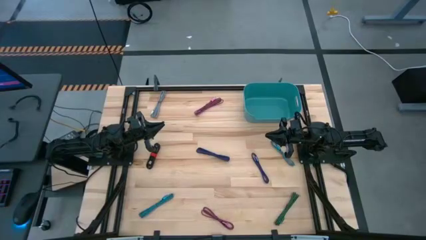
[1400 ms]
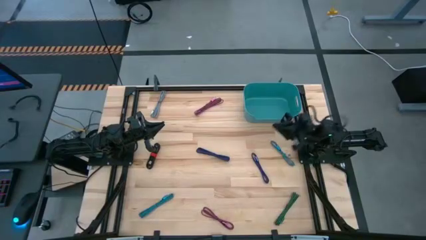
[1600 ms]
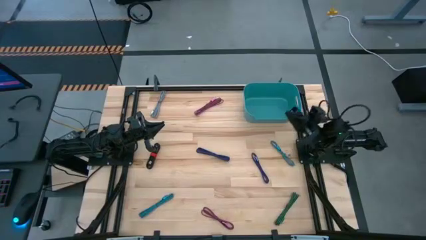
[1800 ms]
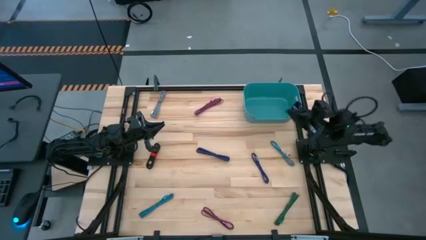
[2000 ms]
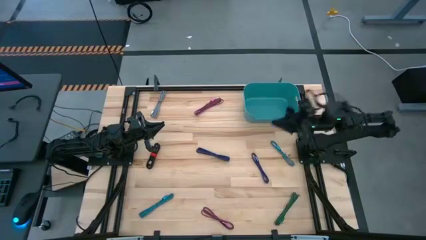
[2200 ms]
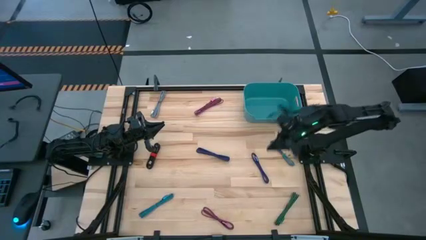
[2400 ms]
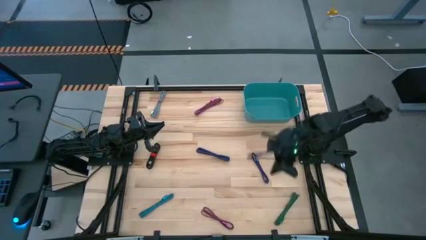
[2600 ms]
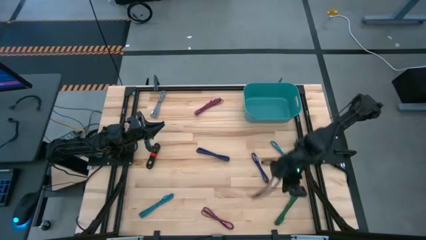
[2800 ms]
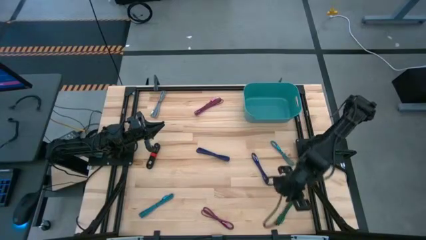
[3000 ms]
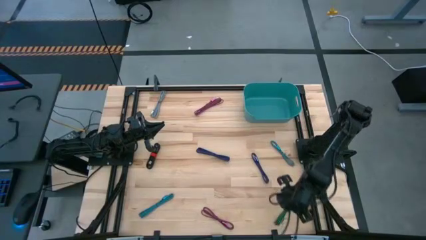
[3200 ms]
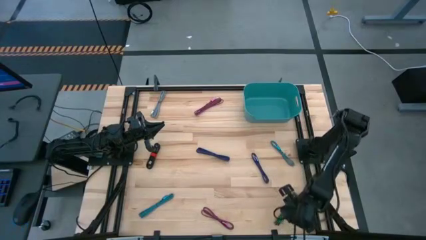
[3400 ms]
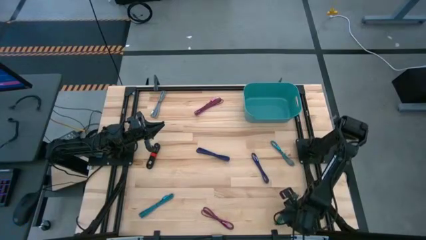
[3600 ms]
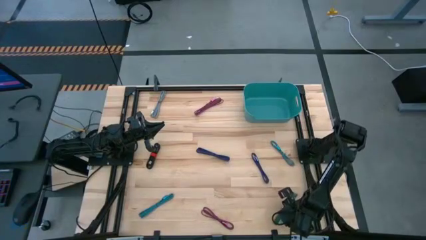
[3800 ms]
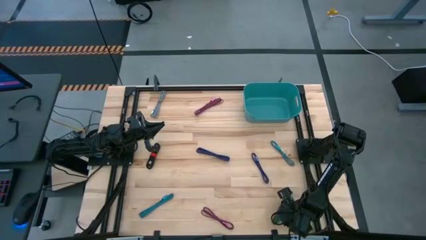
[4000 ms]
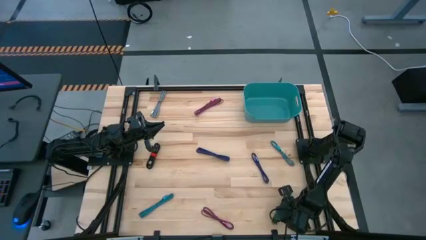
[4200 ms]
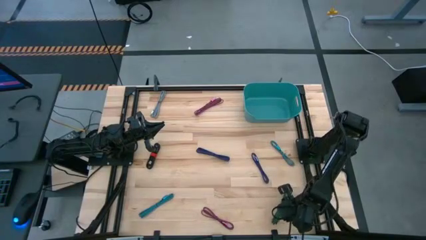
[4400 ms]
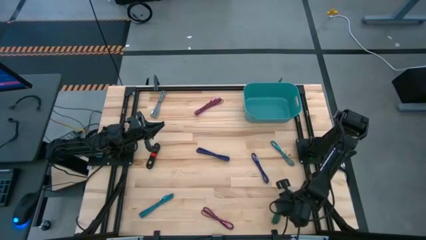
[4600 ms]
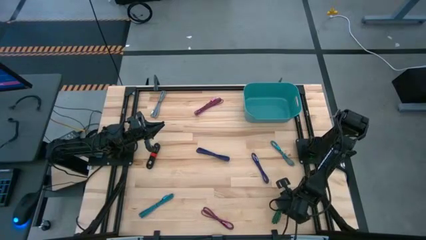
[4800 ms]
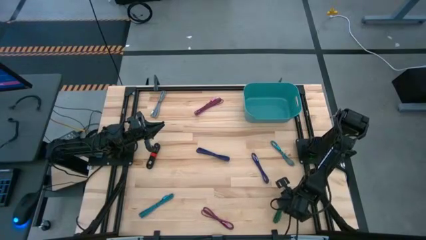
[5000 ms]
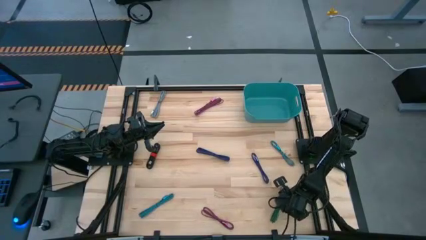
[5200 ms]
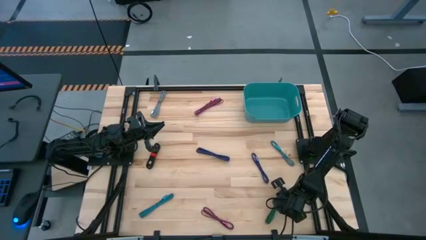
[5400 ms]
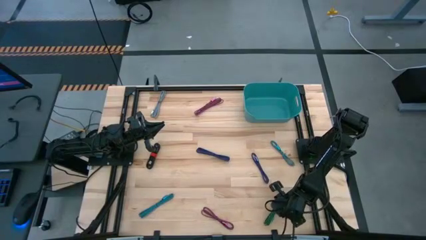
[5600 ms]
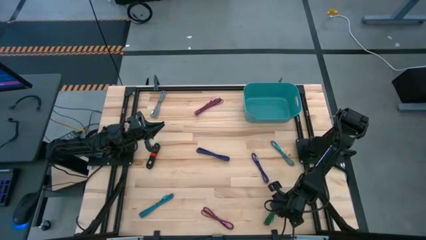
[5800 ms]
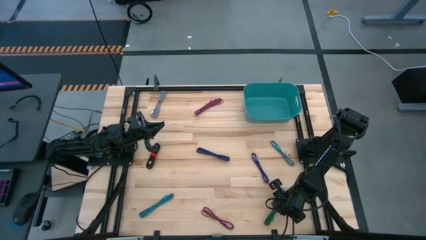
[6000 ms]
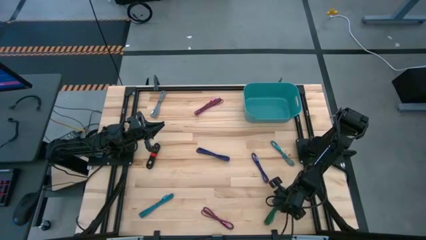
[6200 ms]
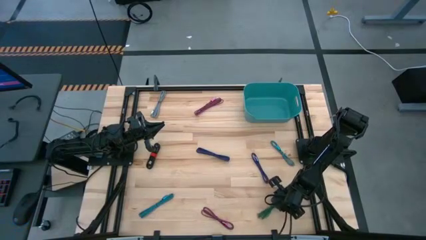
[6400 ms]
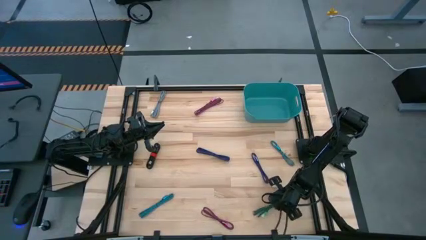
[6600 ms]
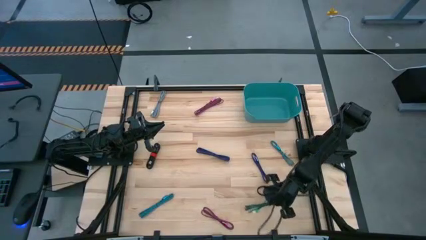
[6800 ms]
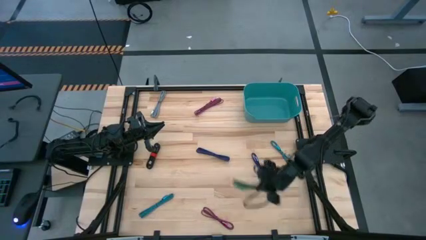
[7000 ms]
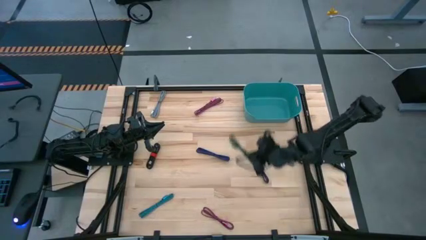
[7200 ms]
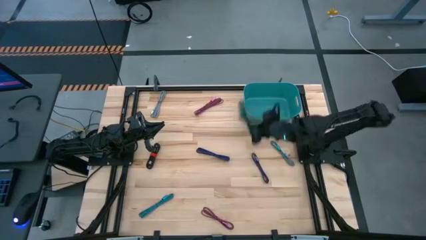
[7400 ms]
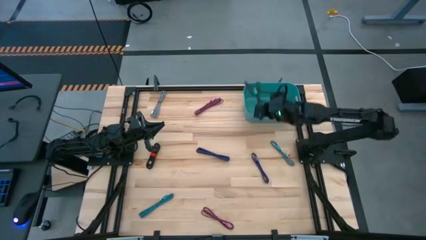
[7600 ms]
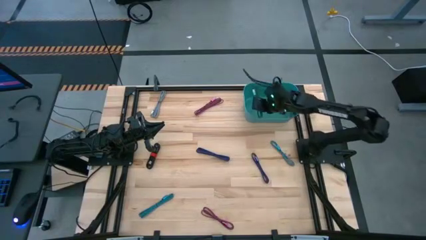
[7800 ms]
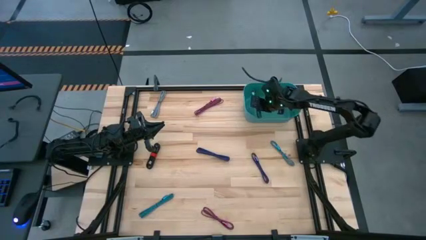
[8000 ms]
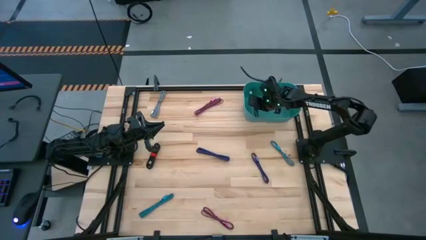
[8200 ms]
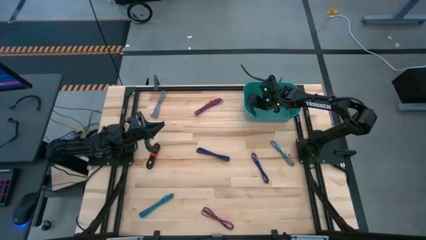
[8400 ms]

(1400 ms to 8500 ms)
Task: Pick and place USB-C Cables
Put the green charger cable into the blue bin

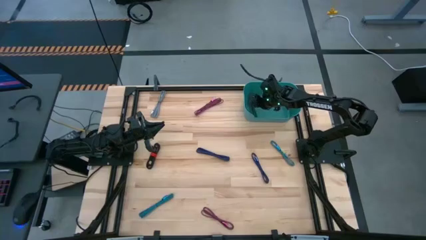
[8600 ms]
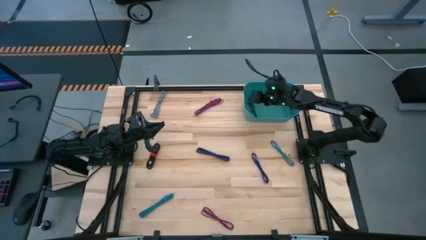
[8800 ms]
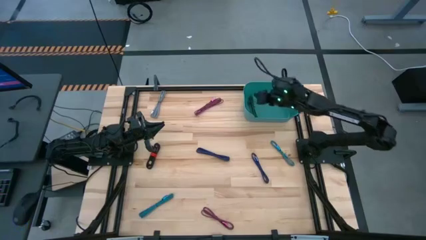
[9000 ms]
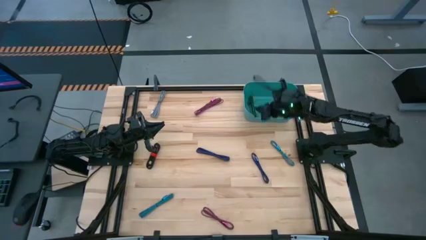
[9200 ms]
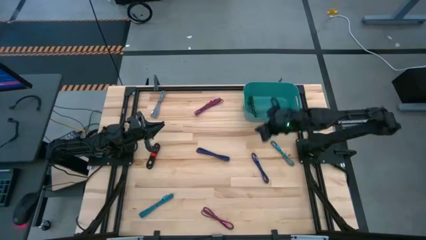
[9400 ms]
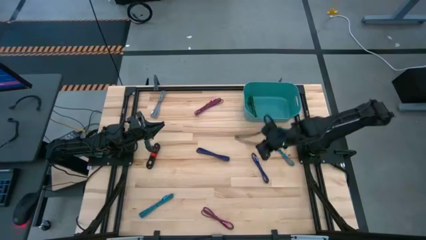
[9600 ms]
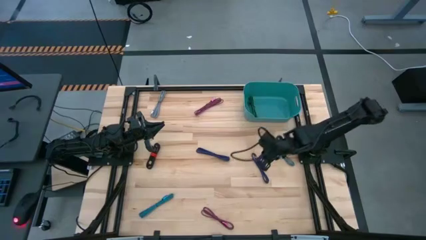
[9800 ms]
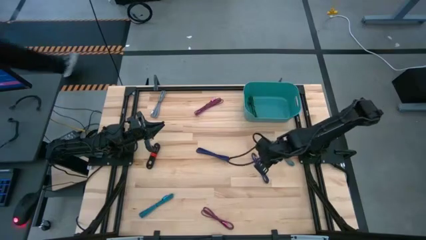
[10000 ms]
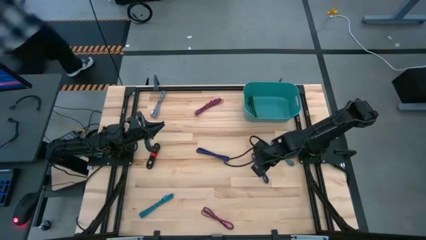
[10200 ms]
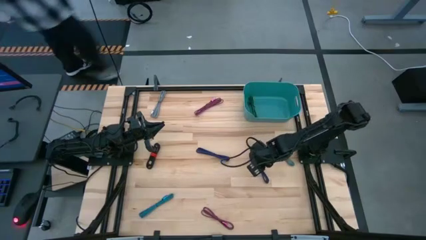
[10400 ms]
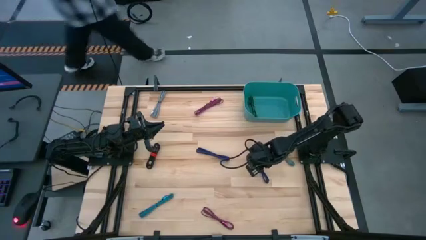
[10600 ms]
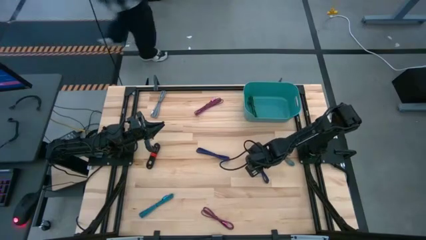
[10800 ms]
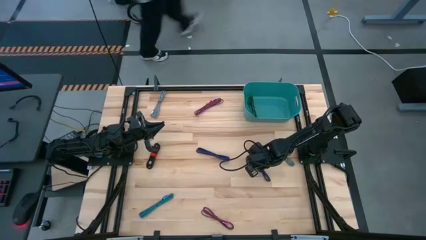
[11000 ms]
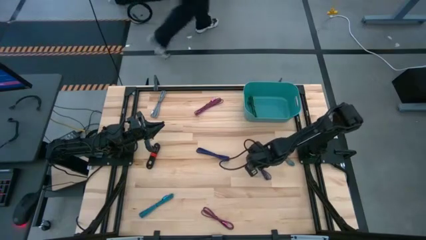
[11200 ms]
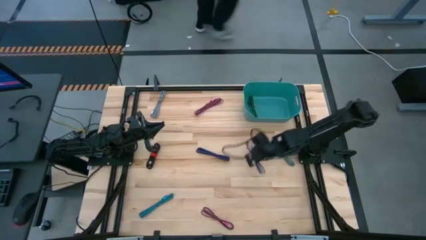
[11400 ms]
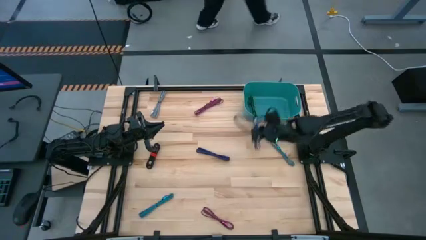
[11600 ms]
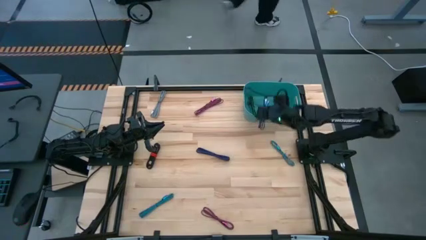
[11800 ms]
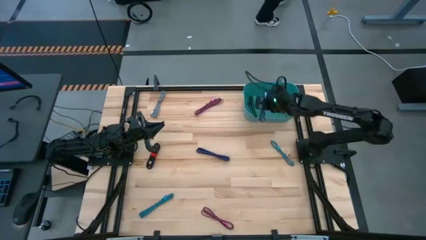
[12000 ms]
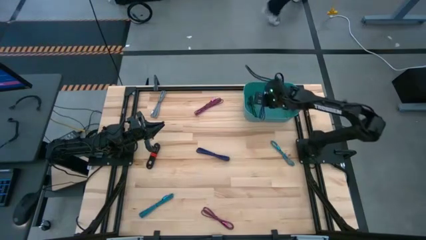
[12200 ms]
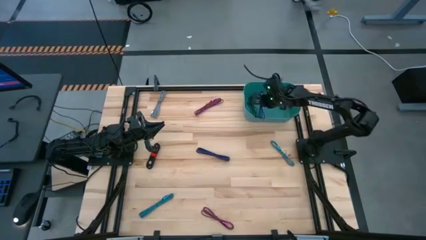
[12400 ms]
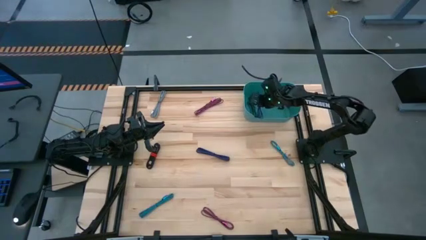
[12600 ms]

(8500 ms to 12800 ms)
Put the purple charger cable into the blue bin

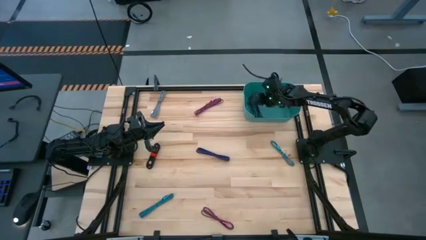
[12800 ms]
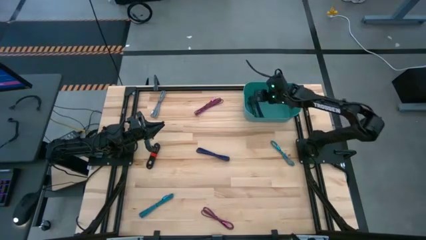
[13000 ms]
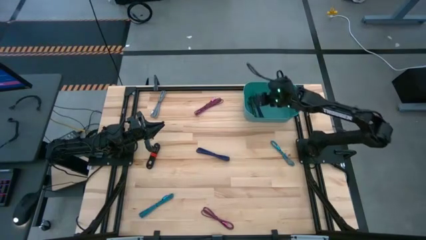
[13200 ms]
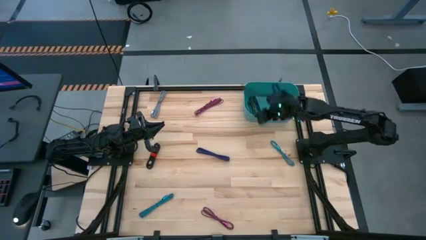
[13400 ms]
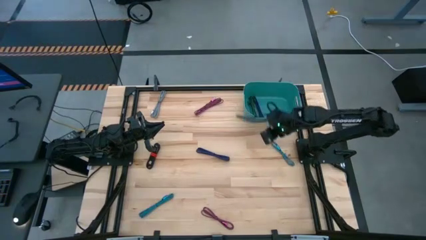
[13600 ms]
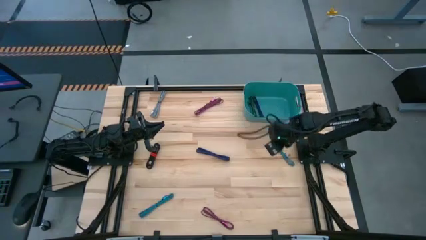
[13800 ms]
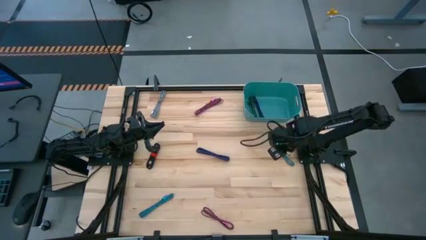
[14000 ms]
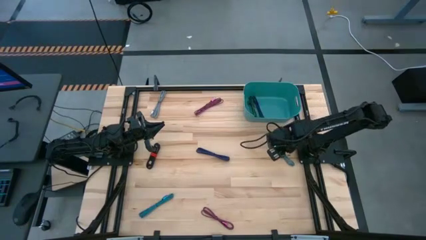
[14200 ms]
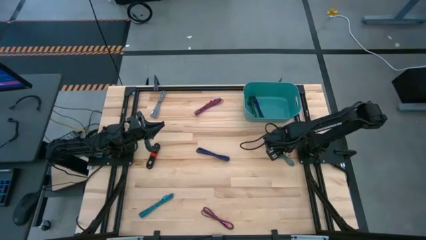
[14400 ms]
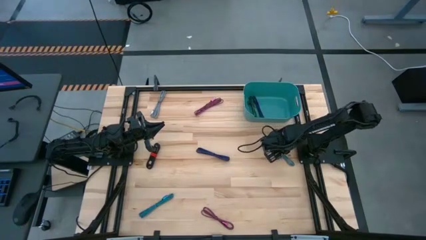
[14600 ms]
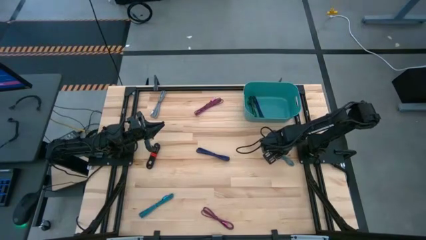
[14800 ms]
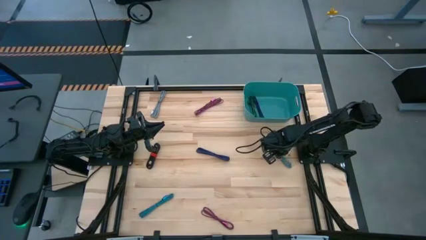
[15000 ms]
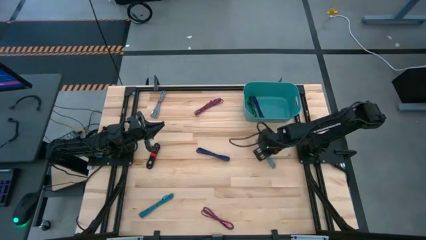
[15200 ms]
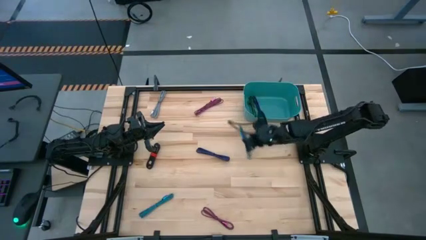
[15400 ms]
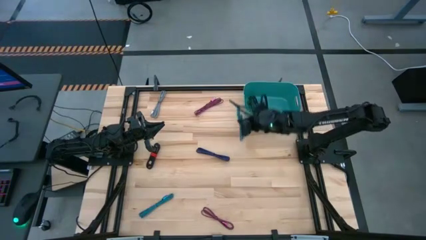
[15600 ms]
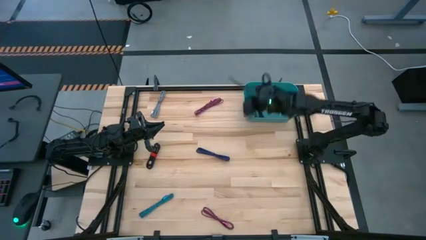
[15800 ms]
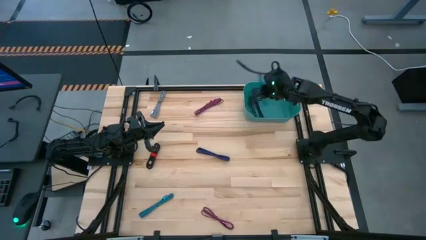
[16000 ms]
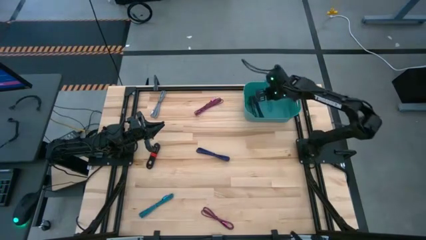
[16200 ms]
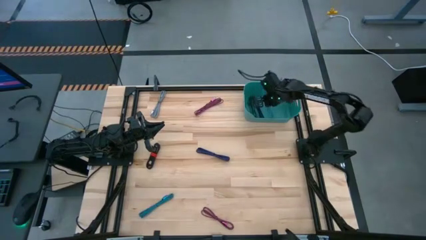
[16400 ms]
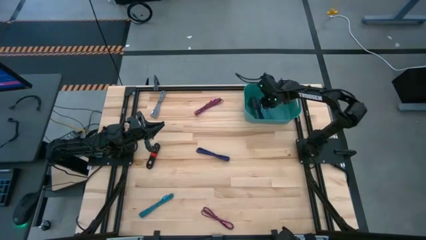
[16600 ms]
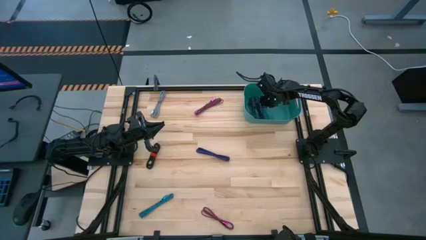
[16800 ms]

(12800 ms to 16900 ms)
Put the blue charger cable into the blue bin

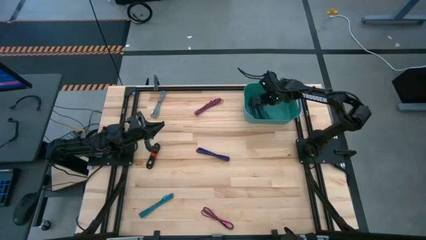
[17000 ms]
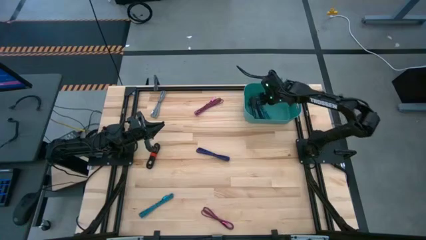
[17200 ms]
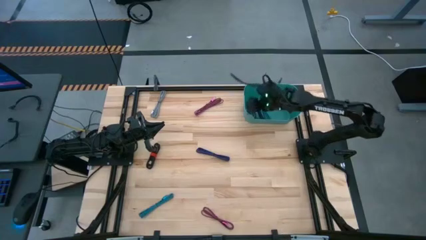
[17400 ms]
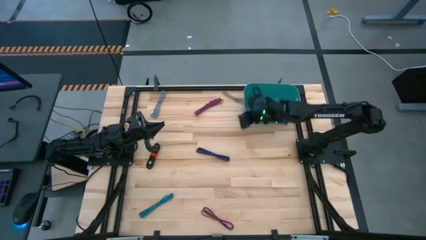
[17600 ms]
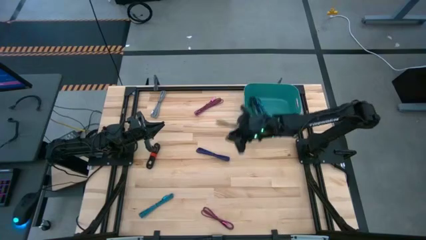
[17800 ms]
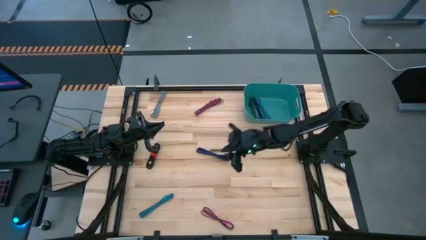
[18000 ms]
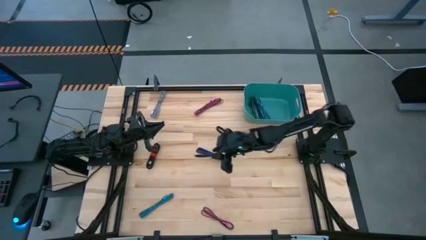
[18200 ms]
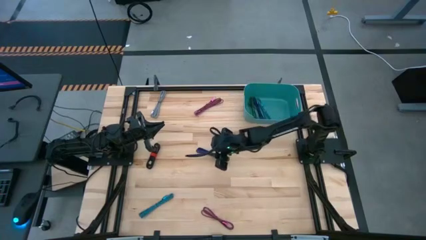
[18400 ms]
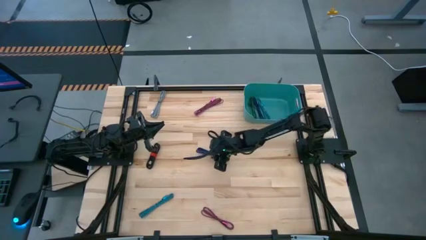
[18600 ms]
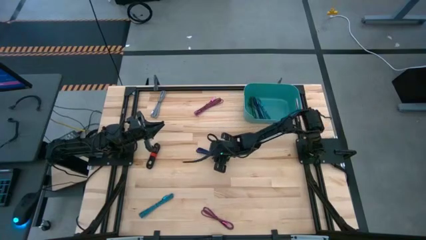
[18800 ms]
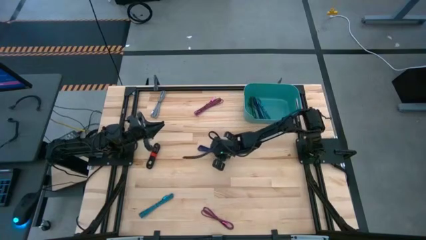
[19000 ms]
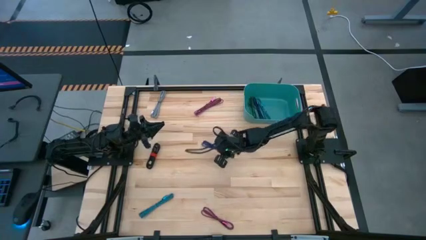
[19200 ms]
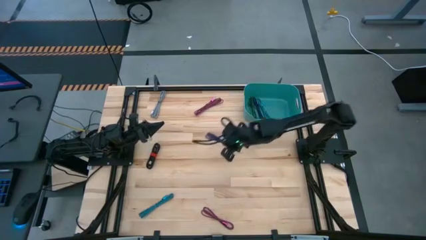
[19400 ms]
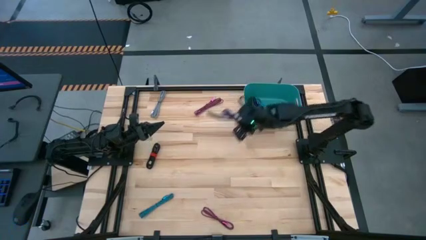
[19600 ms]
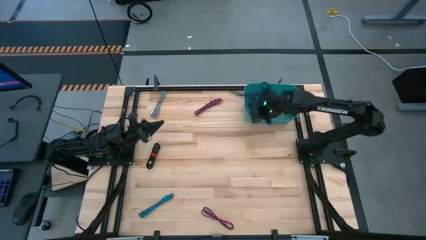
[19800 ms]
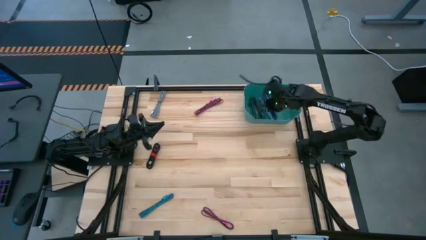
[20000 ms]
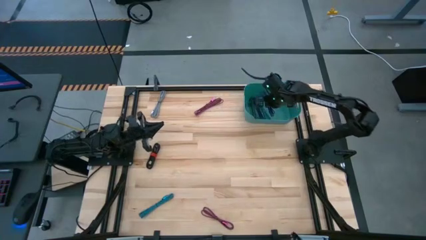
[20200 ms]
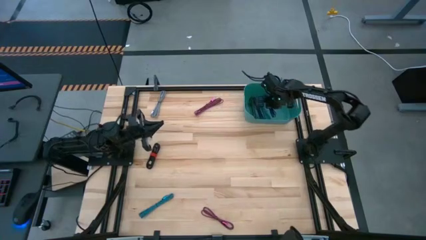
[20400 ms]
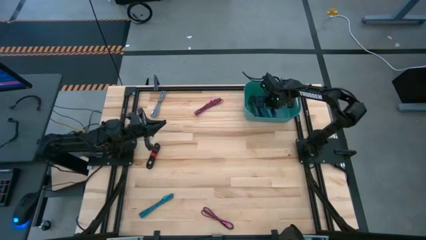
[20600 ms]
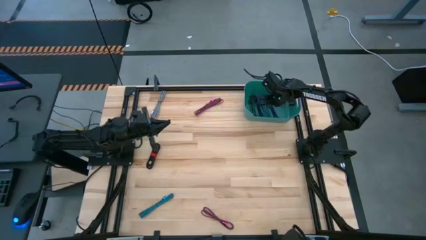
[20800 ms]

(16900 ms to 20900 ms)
Put the purple charger cable into the blue bin
